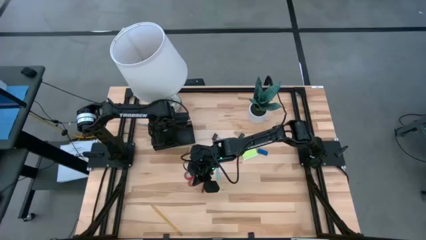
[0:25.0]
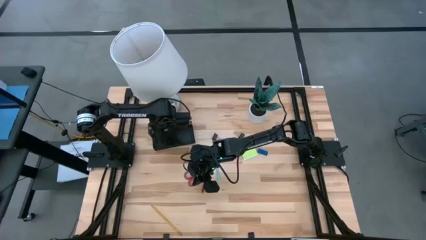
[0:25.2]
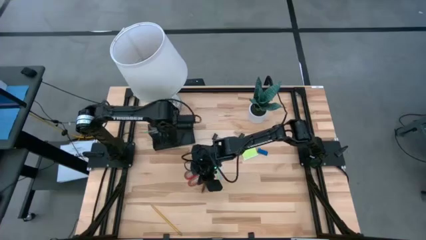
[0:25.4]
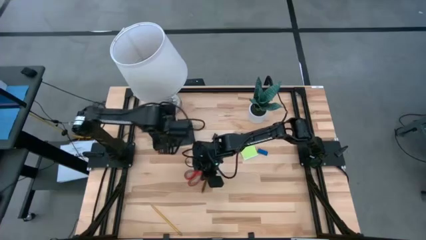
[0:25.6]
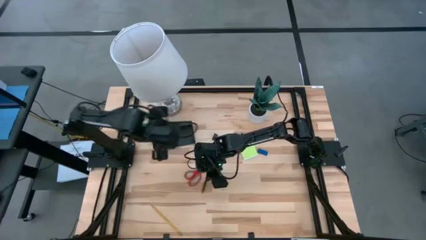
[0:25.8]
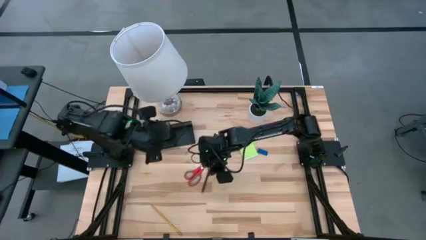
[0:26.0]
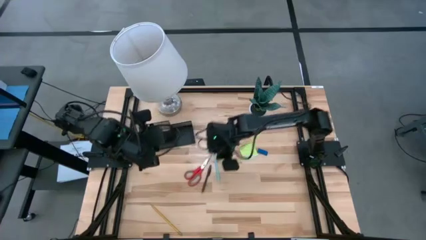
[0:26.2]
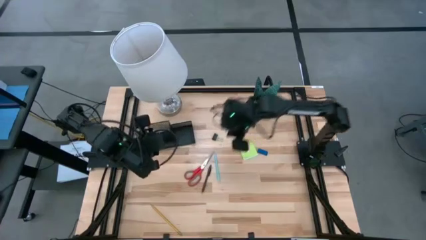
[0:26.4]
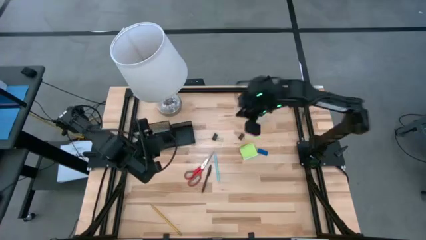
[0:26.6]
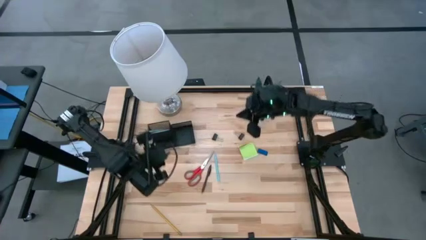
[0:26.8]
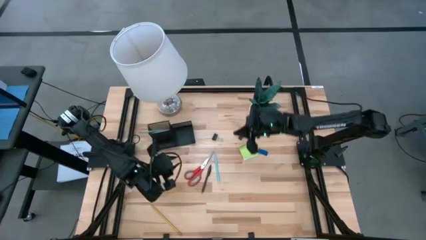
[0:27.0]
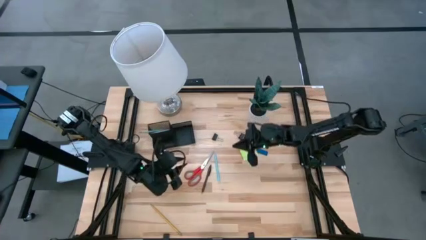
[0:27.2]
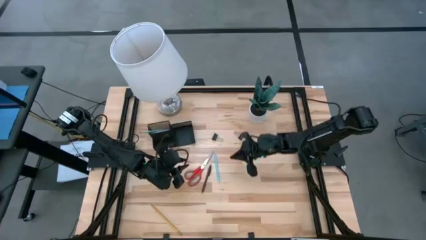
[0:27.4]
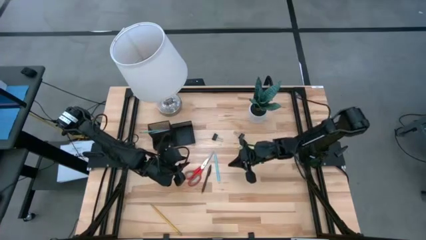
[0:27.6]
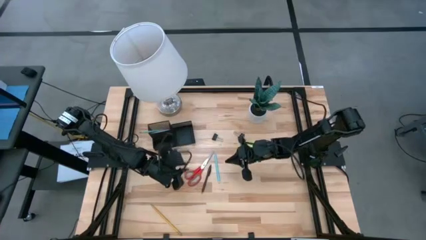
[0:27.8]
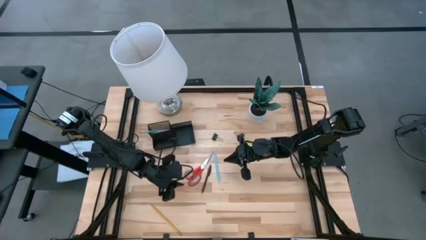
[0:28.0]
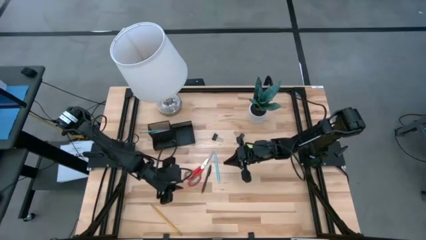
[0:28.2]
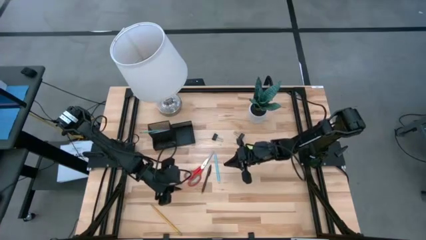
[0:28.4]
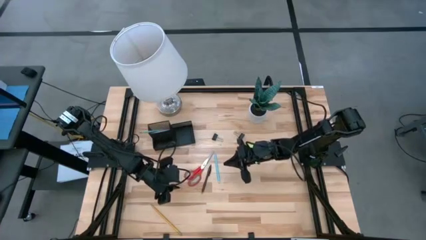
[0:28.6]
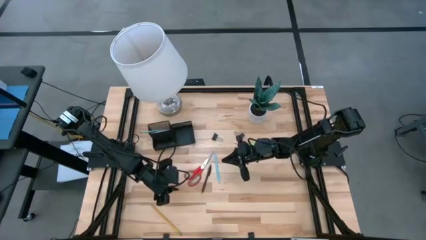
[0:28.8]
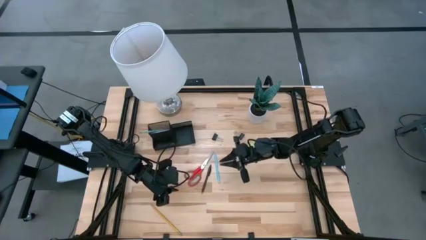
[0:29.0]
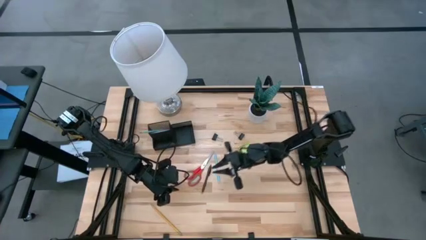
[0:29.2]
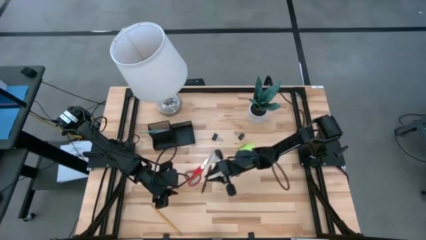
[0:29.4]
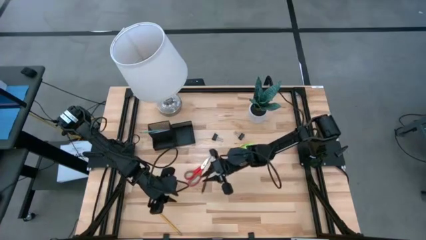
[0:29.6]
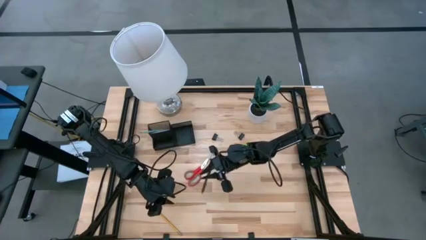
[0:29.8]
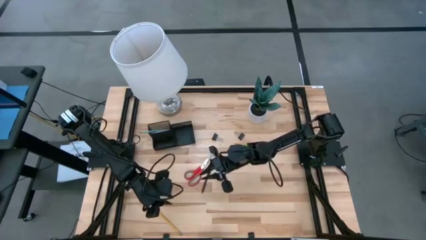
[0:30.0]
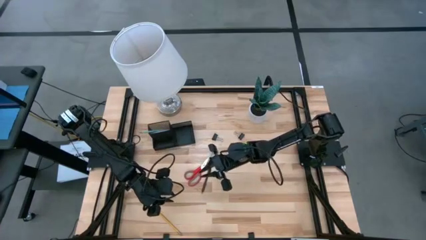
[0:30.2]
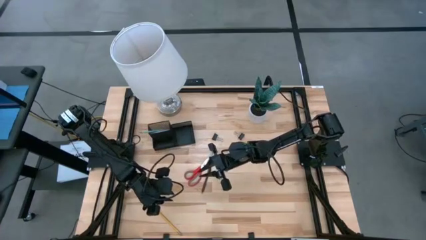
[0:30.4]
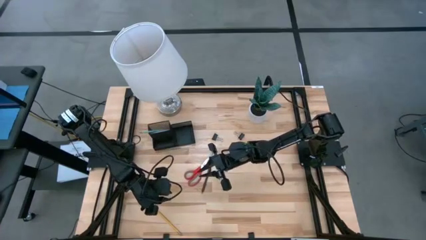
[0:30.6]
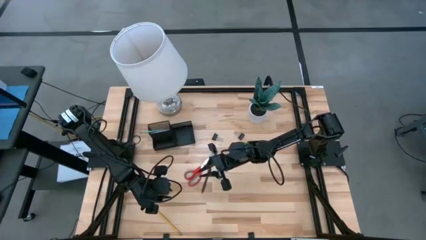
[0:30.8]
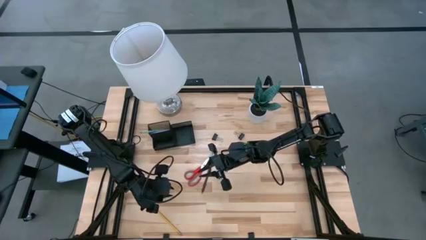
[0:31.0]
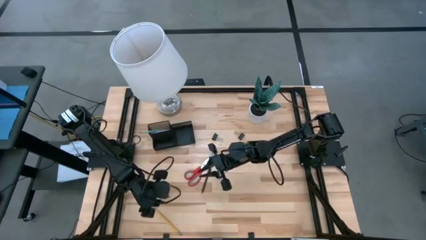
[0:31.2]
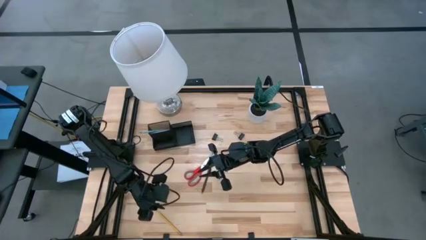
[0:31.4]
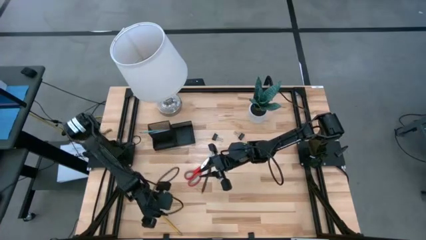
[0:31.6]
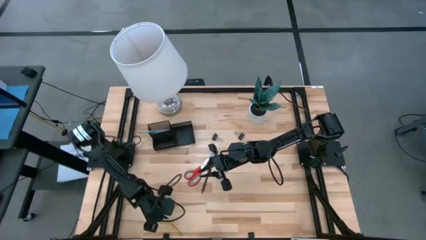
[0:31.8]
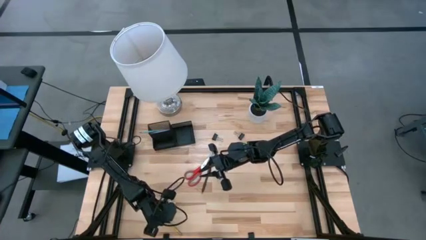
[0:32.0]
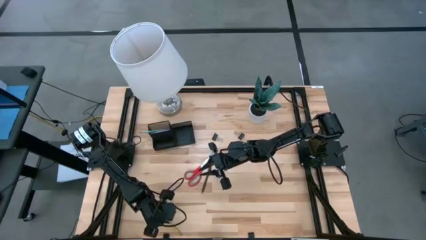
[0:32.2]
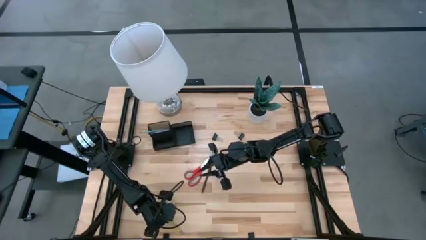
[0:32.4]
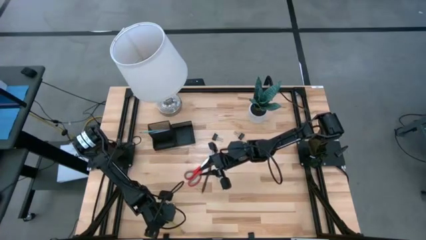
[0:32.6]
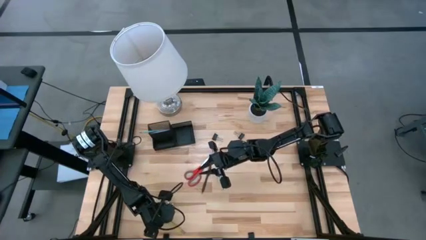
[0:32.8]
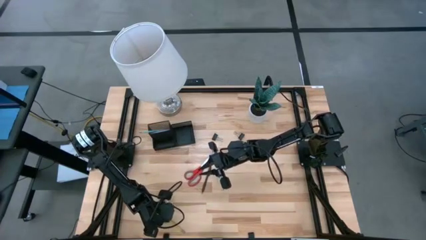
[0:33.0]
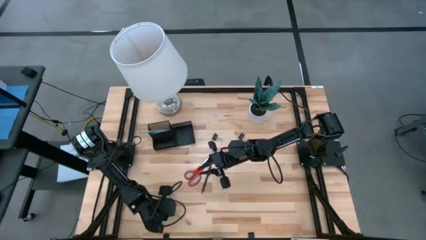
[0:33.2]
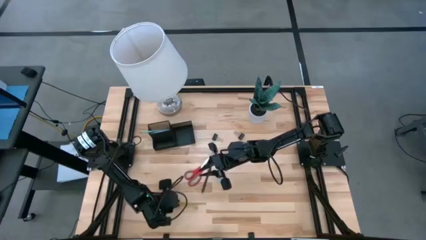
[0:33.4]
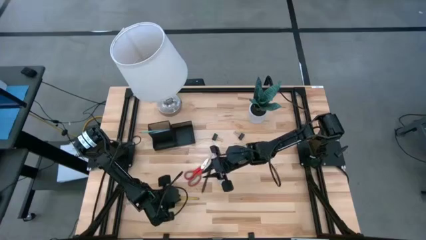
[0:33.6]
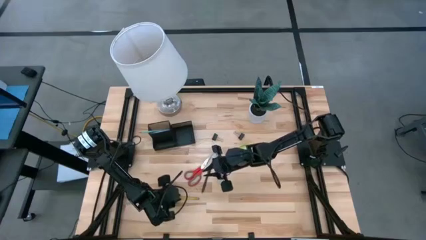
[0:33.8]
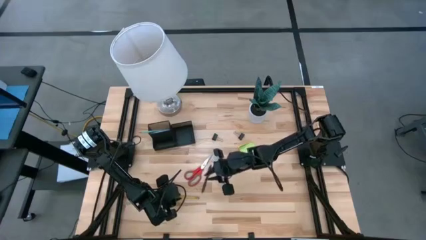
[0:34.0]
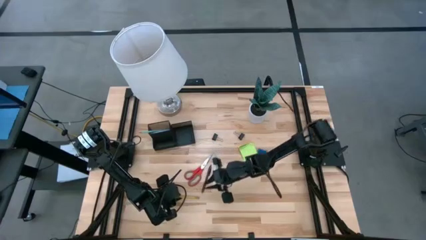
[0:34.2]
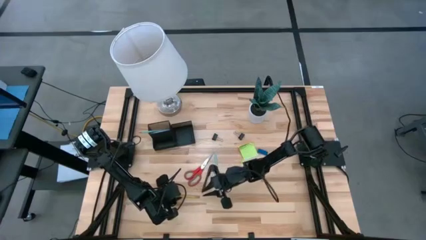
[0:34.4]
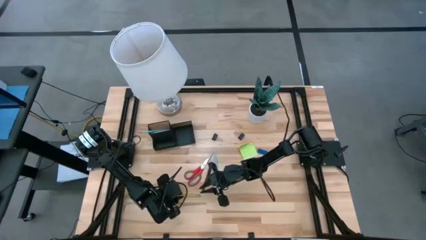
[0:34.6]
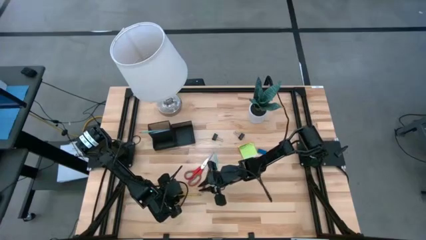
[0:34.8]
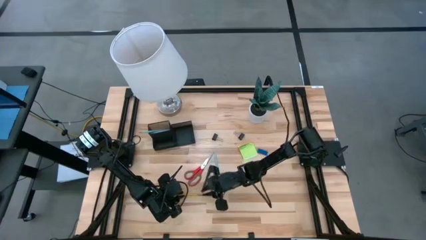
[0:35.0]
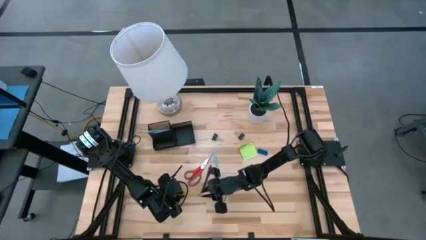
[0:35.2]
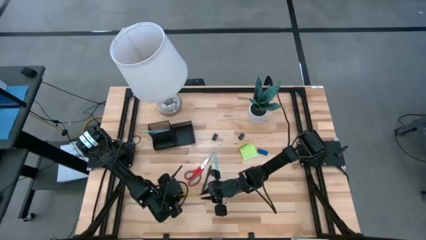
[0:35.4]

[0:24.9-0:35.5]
Task: Pick and place office supplies into organizer
Put the yellow pencil into the black desk organizer

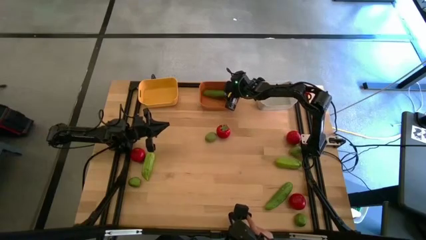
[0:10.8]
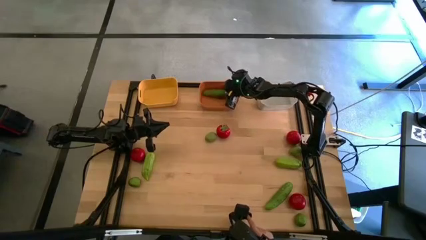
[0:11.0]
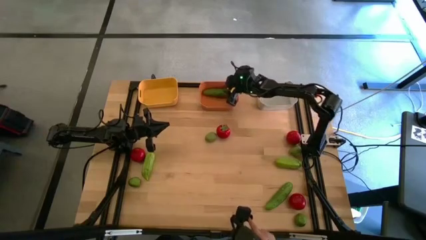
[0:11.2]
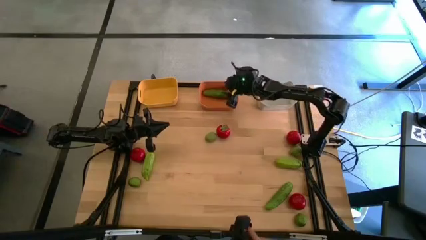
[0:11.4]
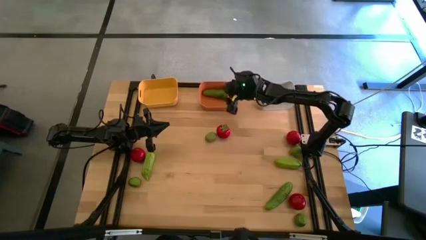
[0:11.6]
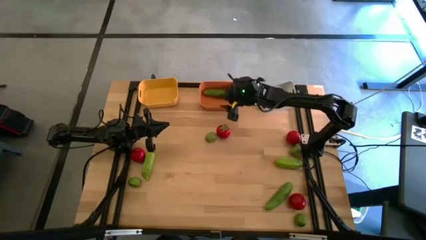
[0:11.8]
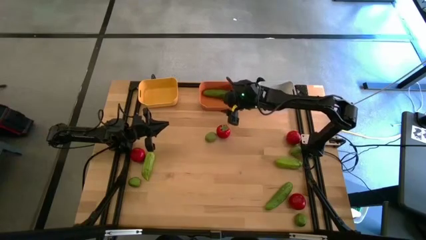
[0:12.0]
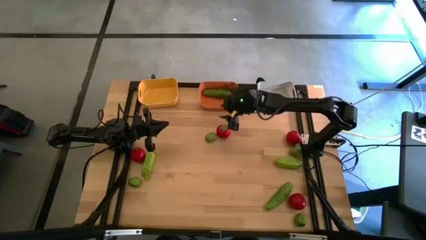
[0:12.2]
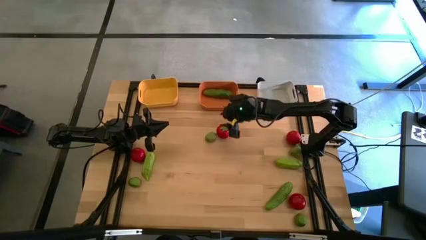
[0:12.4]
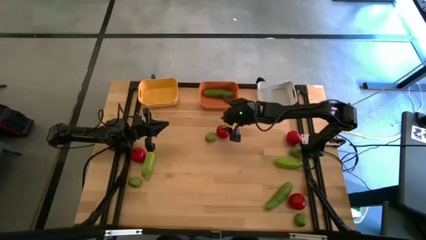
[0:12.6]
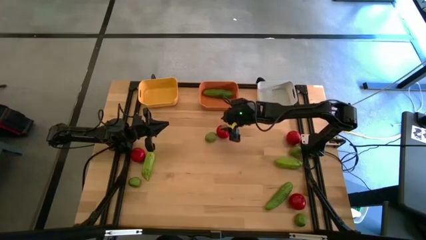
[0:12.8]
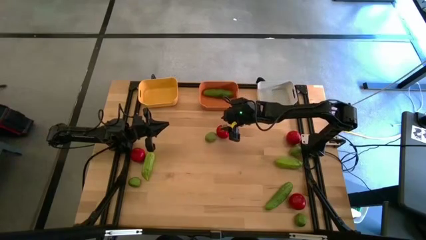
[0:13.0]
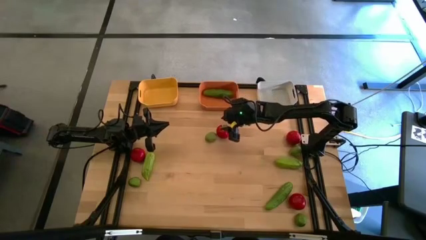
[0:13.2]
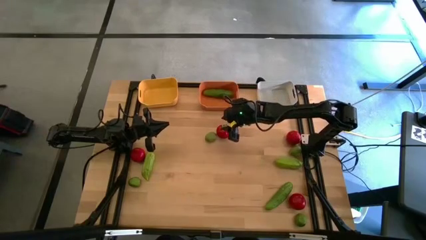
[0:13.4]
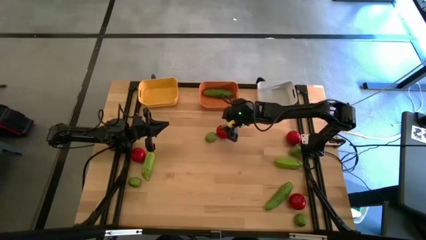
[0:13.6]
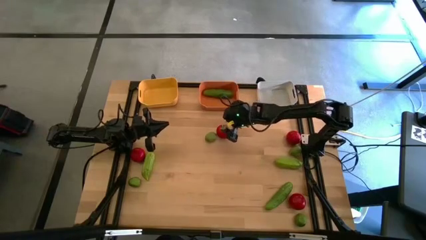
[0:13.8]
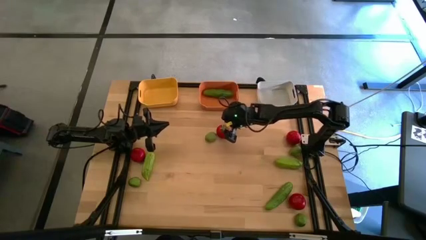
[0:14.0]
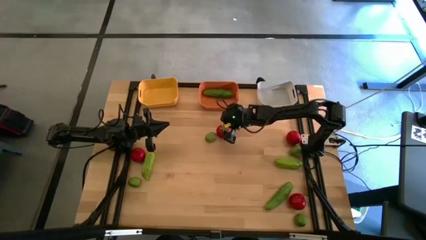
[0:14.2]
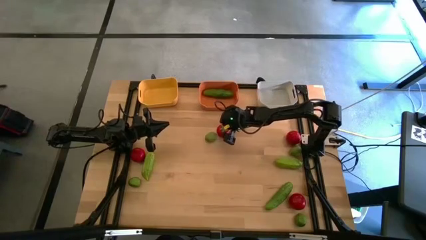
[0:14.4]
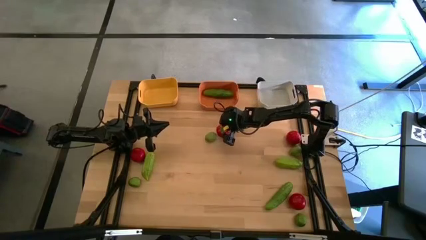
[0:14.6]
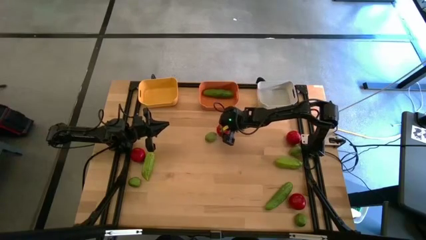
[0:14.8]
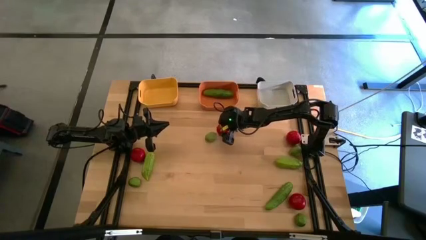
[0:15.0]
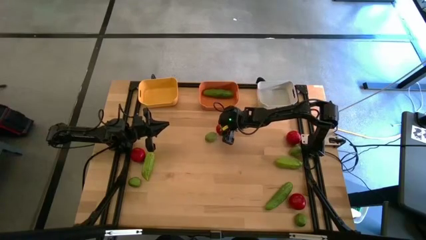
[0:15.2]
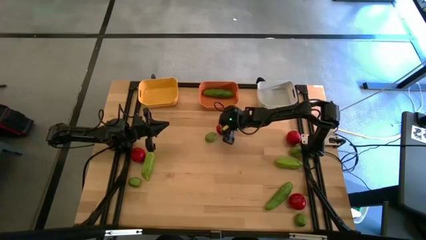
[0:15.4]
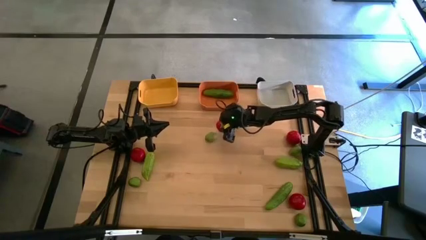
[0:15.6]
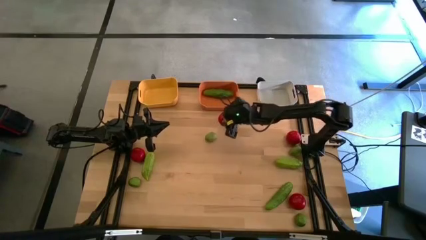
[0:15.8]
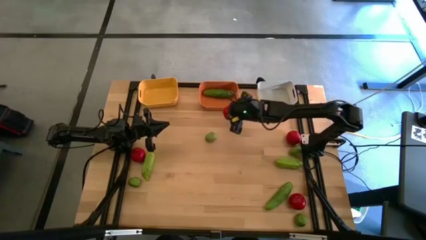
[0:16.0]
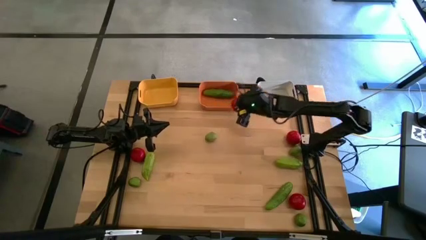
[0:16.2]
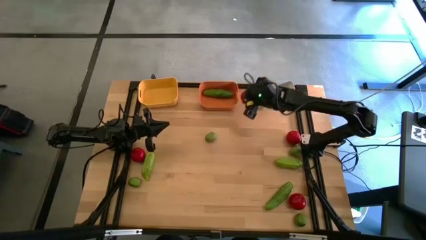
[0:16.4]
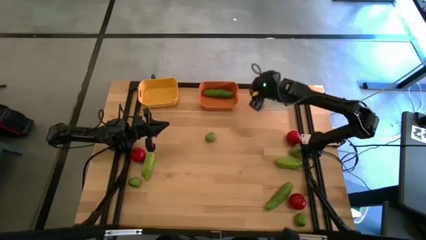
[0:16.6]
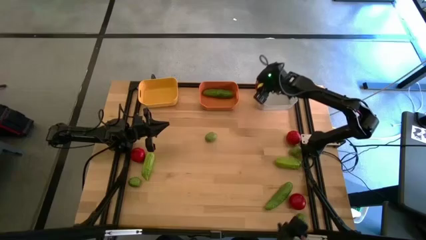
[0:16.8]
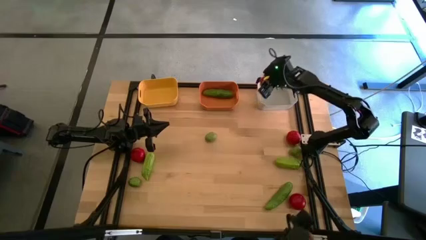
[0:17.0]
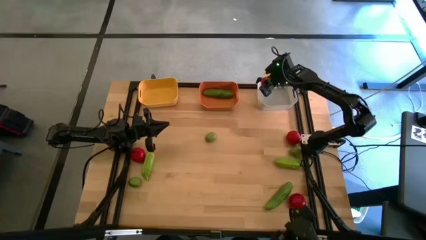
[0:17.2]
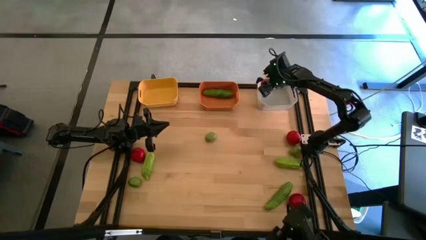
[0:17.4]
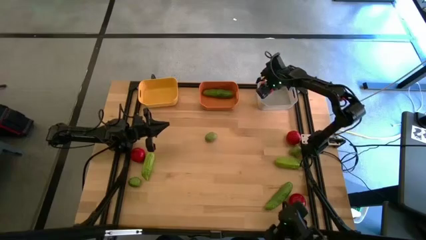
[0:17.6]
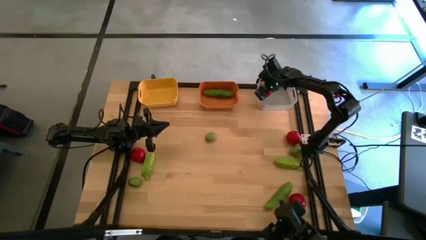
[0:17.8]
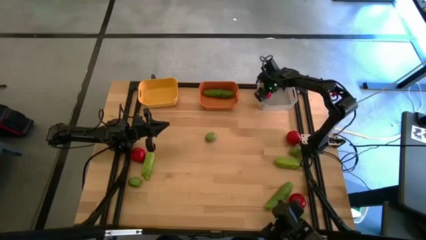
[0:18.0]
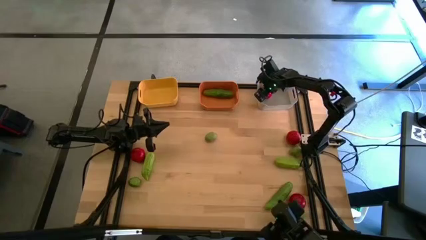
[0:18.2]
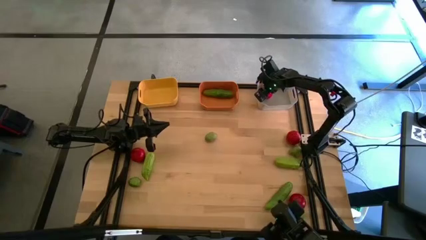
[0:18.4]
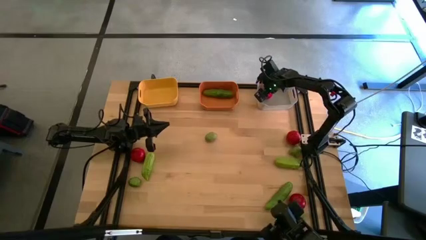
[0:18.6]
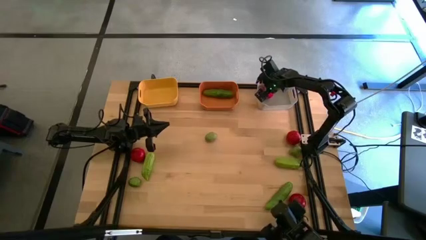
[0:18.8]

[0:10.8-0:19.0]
Task: Sort produce into baskets
Put the tomato into the white bin
